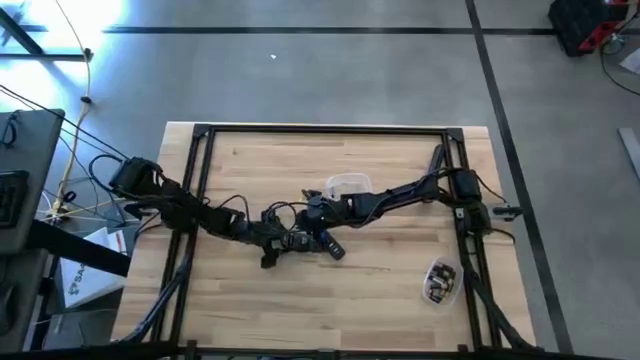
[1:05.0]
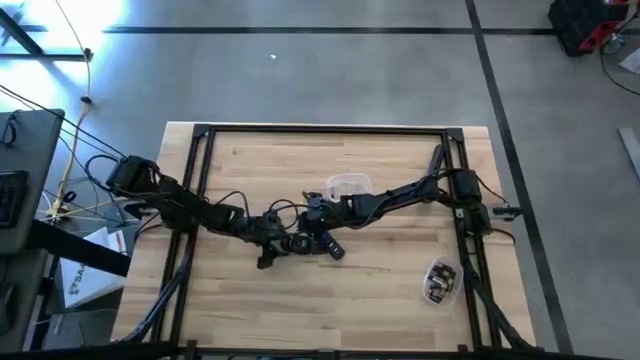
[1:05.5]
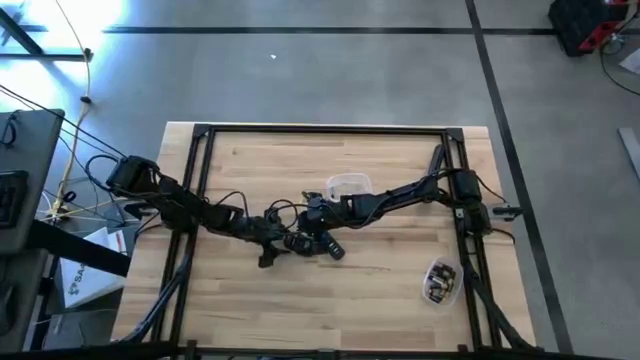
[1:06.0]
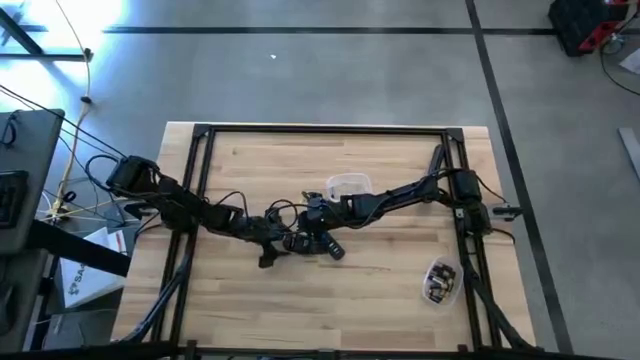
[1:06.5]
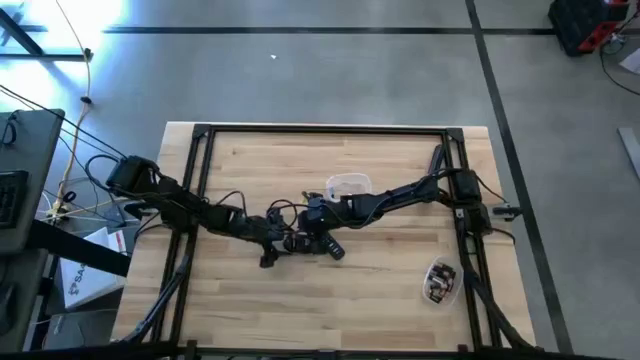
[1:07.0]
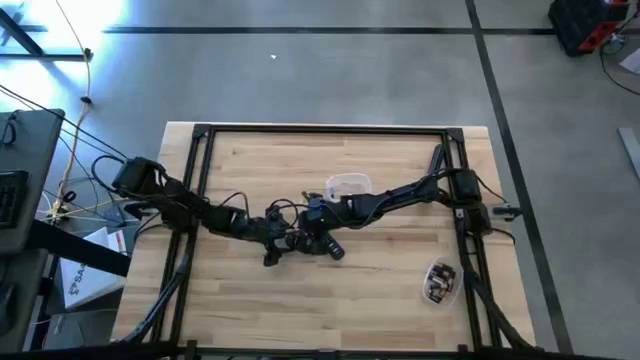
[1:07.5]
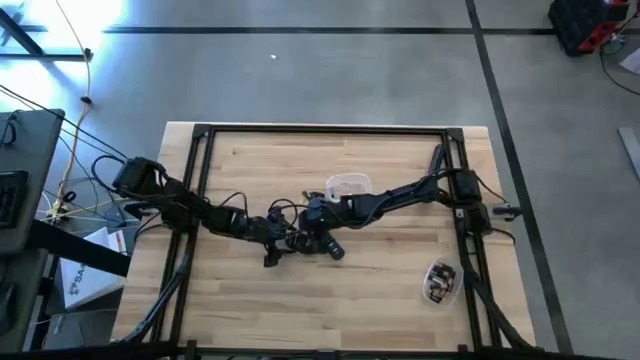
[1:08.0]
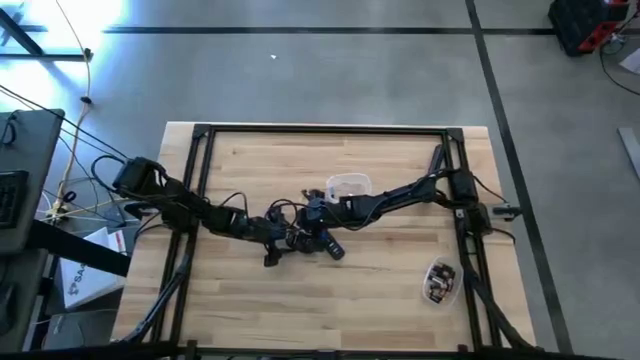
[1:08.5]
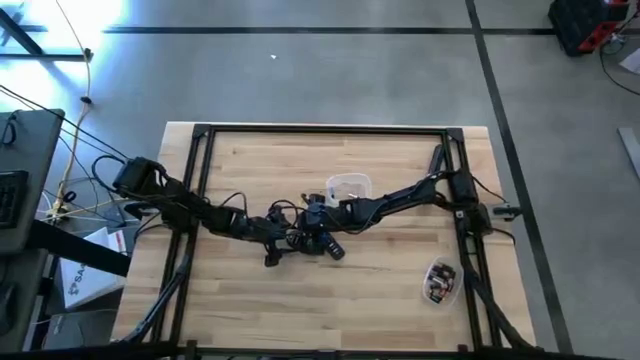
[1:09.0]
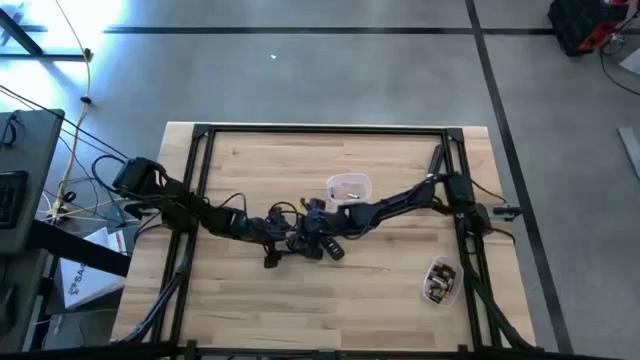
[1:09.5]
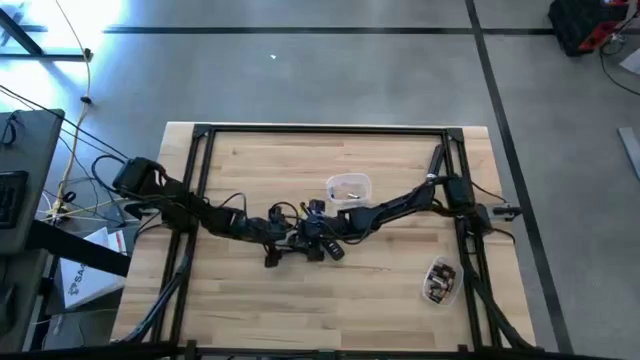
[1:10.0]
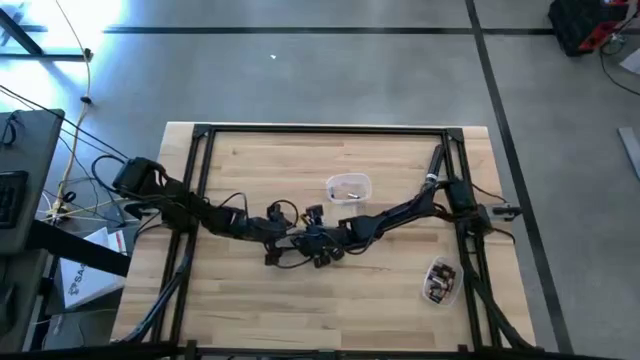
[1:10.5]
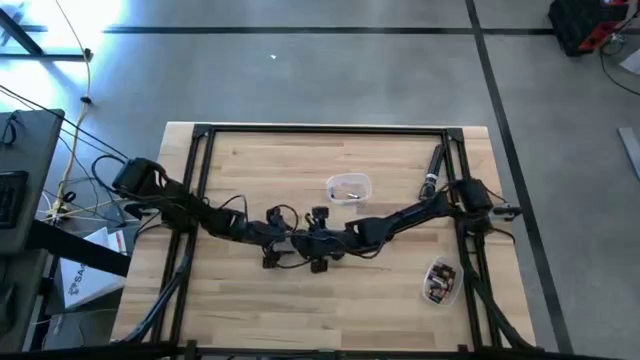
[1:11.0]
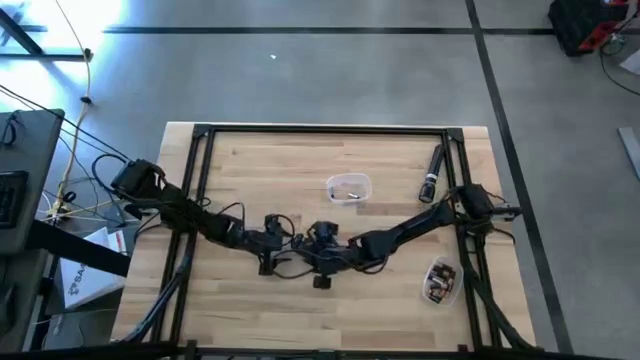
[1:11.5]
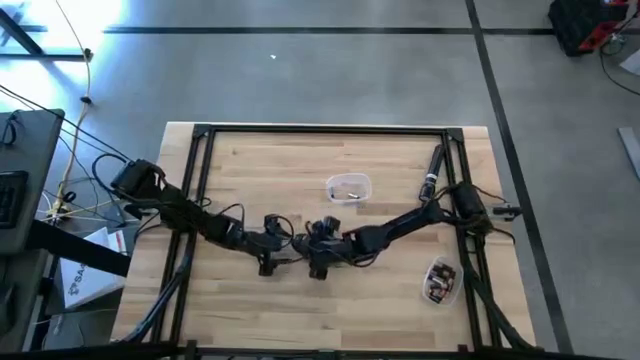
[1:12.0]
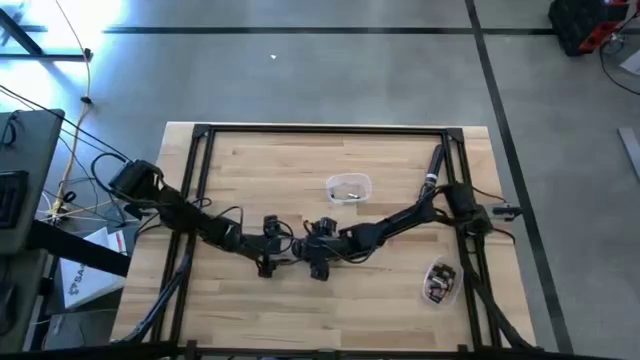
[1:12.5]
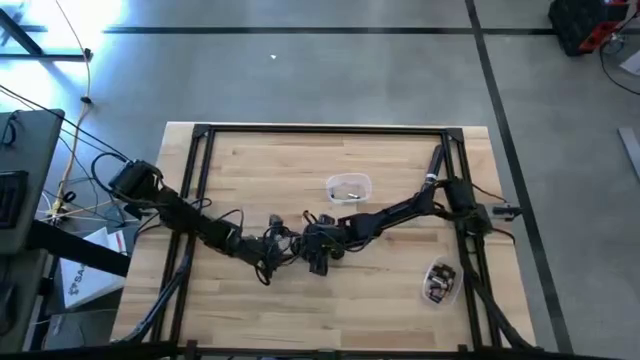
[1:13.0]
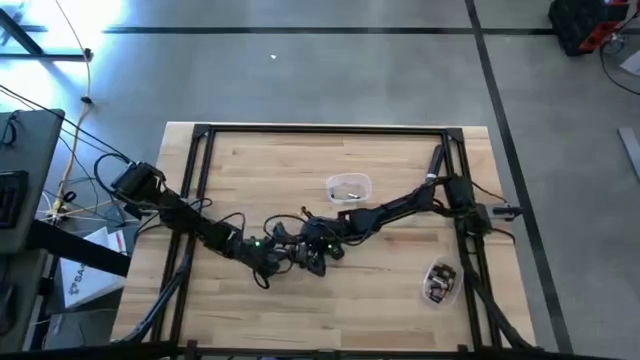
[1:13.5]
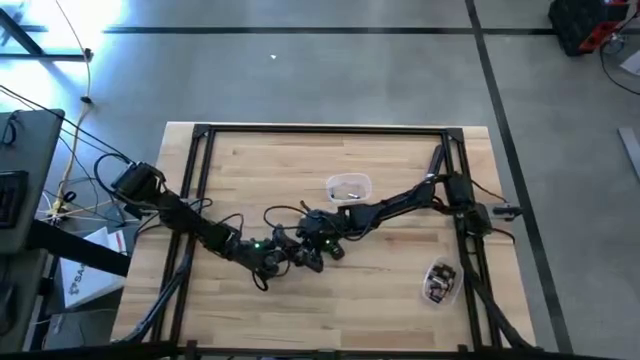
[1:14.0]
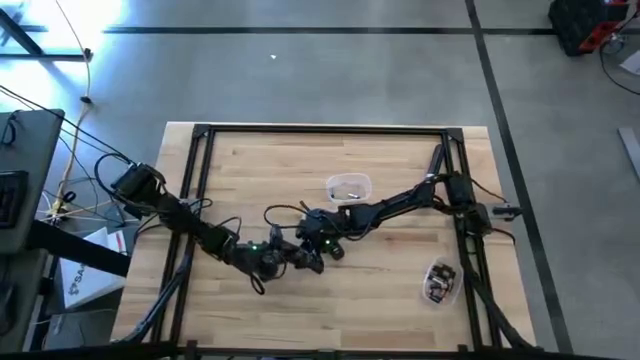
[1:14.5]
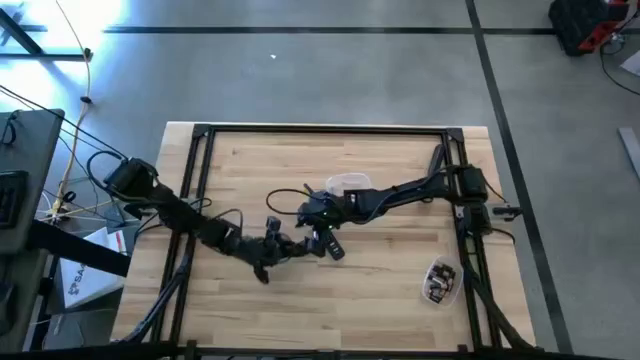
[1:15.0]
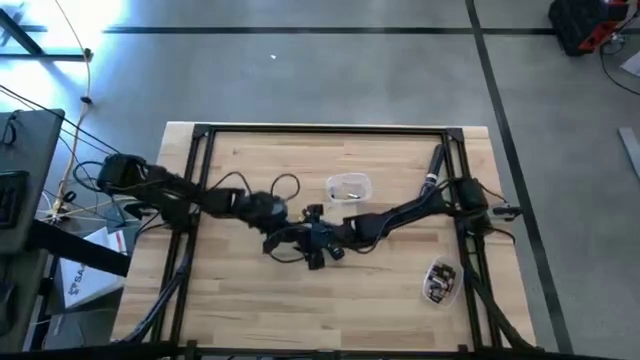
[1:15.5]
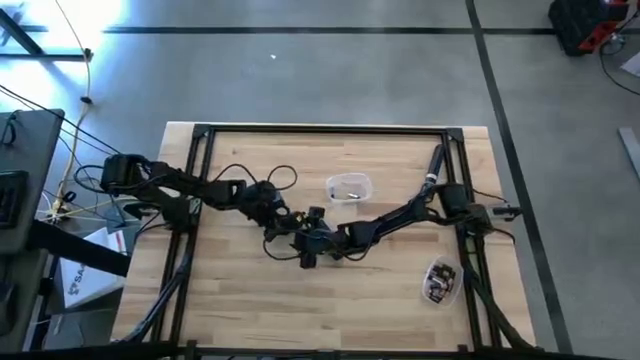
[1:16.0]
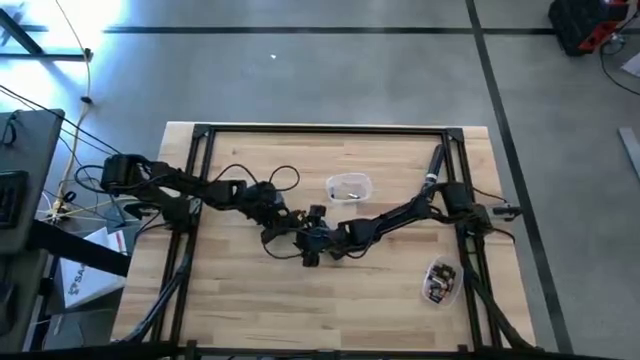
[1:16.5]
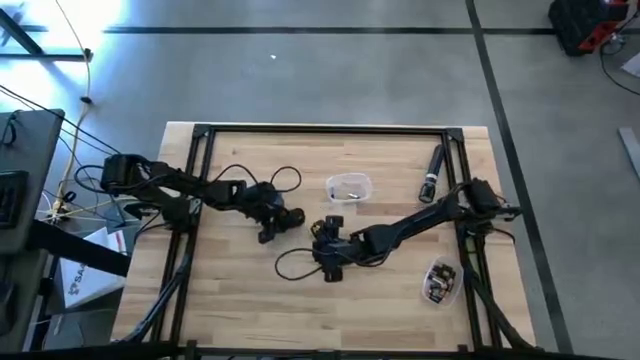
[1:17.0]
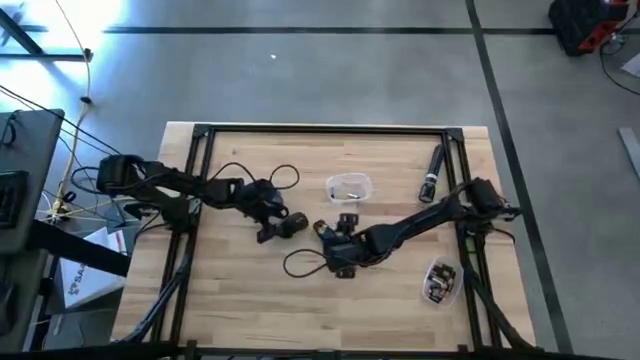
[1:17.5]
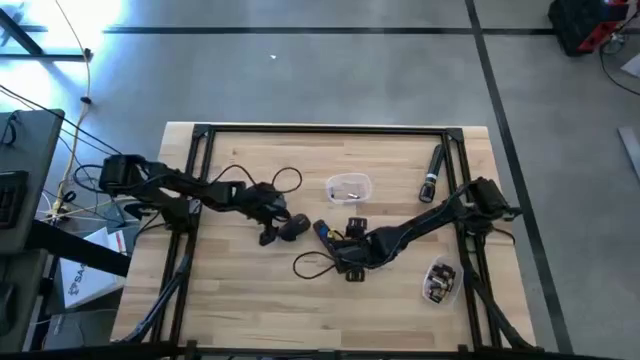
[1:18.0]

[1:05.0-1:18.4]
Task: Insert battery
Insert the black battery into the computer mouse
